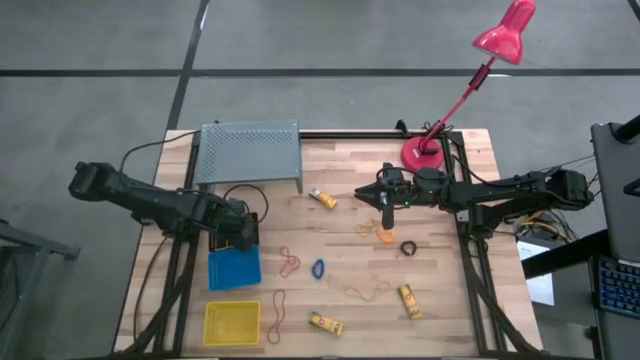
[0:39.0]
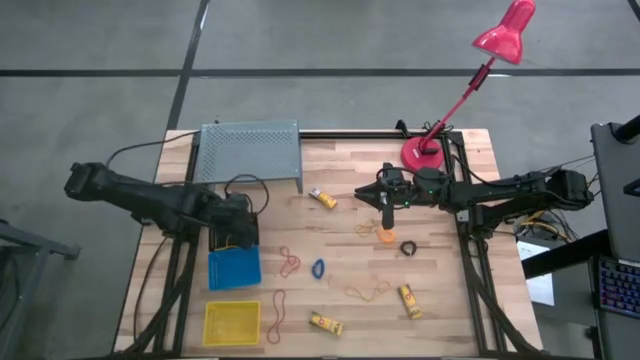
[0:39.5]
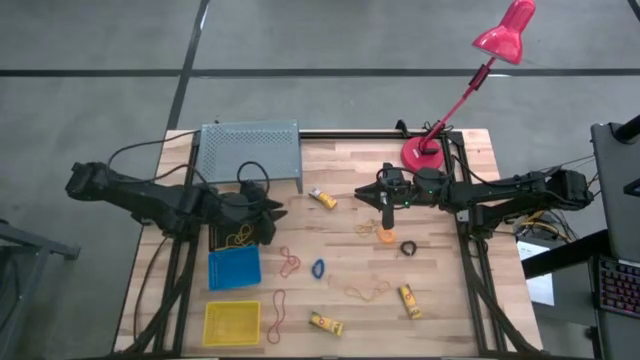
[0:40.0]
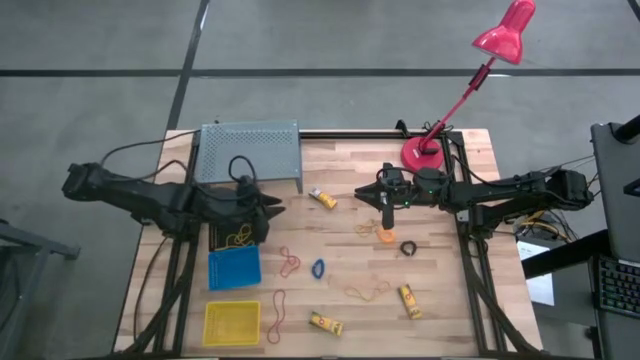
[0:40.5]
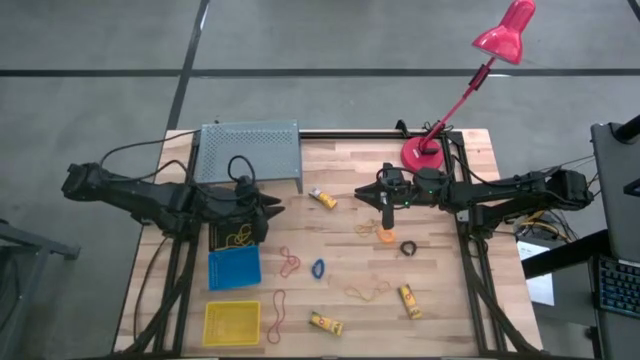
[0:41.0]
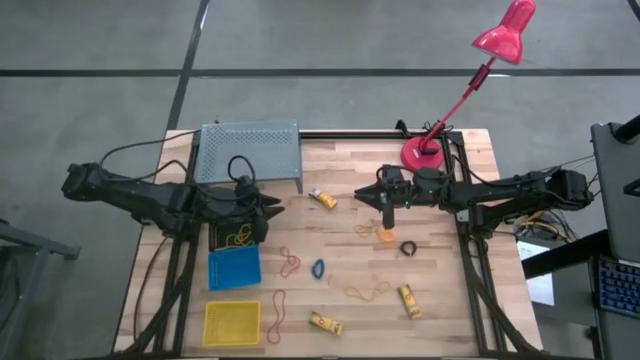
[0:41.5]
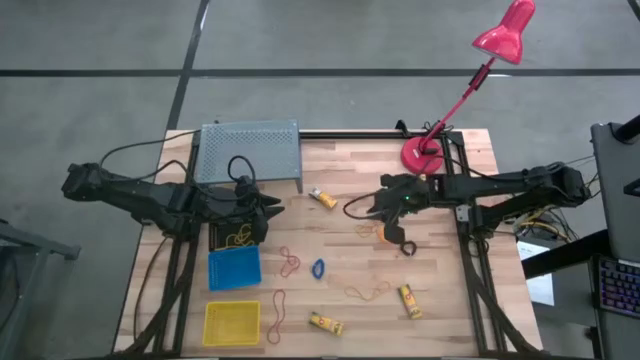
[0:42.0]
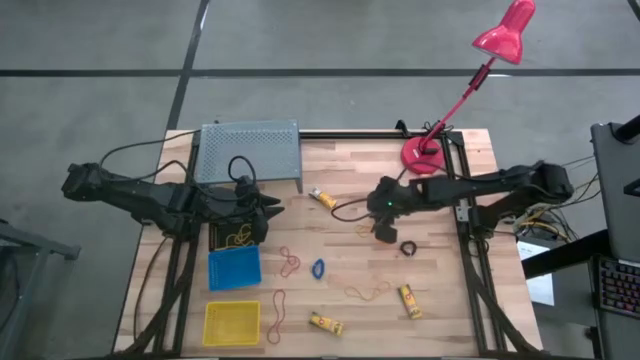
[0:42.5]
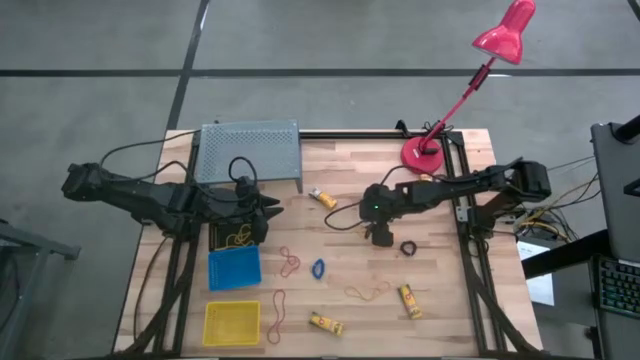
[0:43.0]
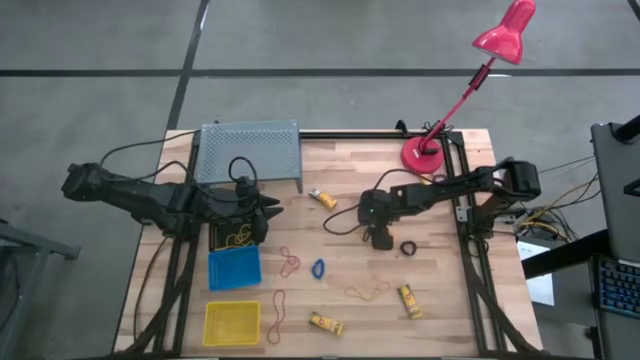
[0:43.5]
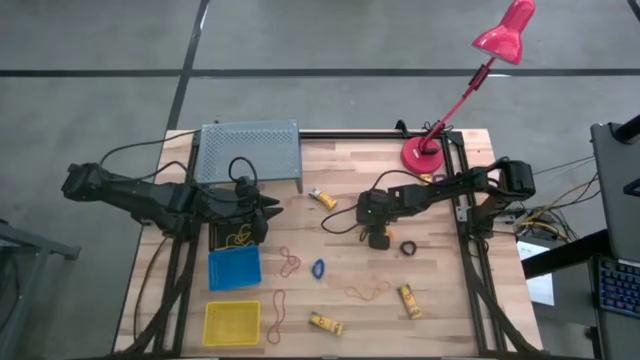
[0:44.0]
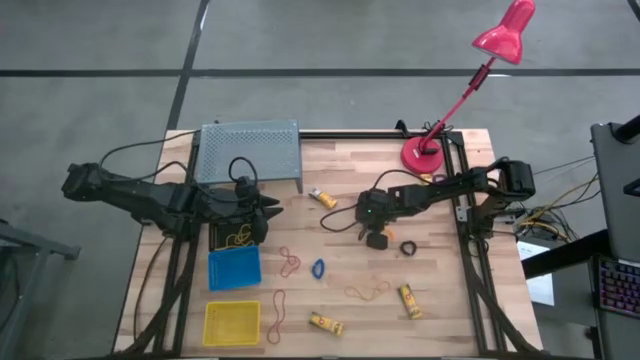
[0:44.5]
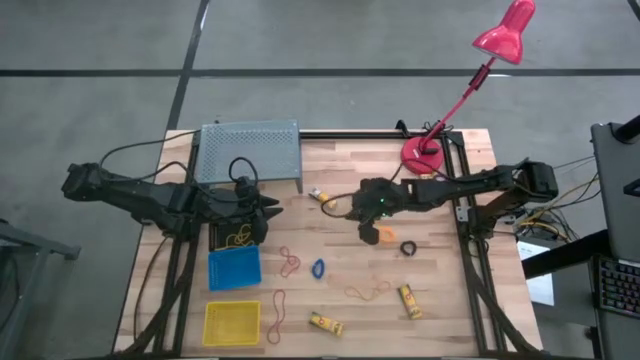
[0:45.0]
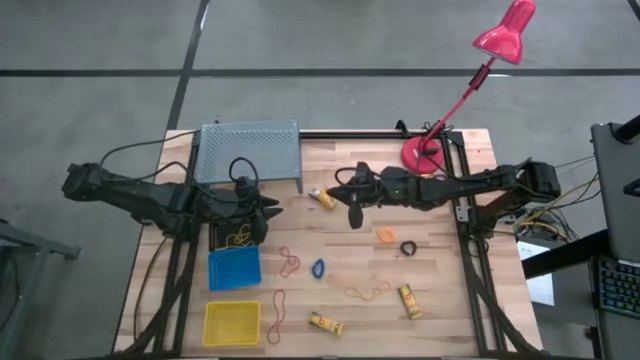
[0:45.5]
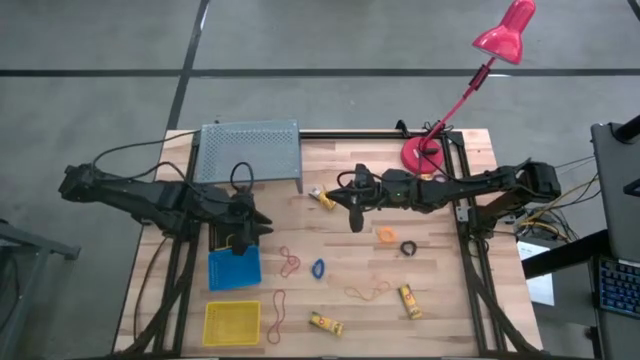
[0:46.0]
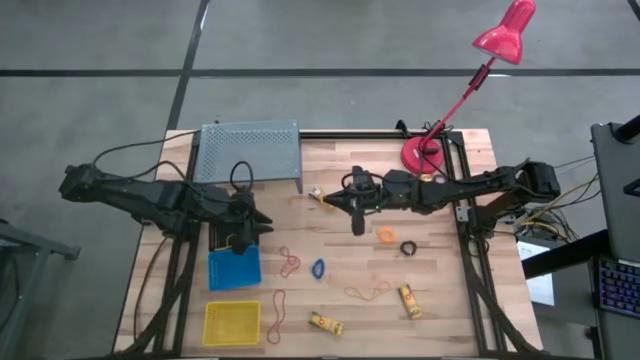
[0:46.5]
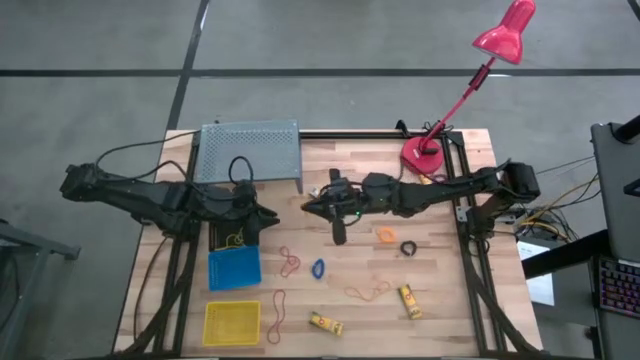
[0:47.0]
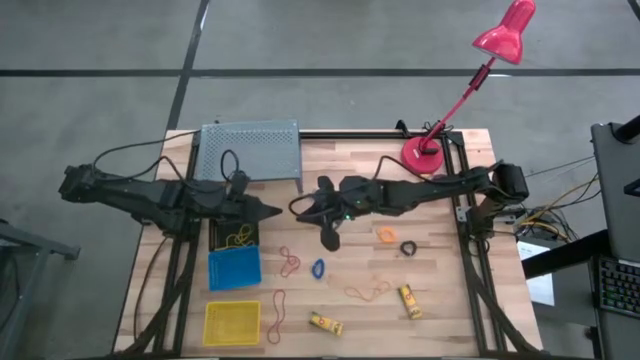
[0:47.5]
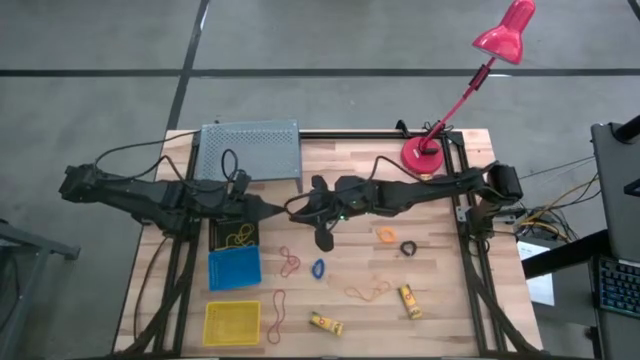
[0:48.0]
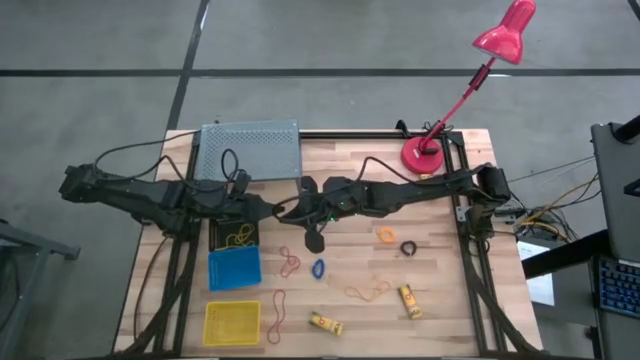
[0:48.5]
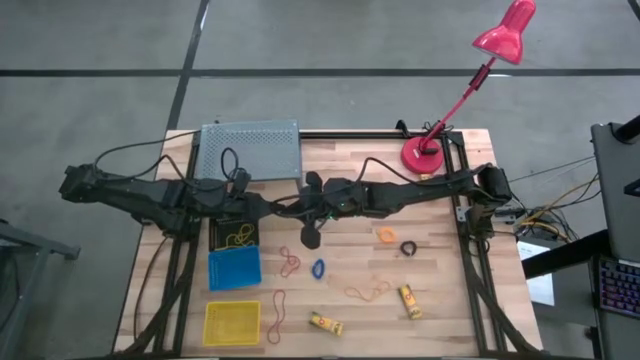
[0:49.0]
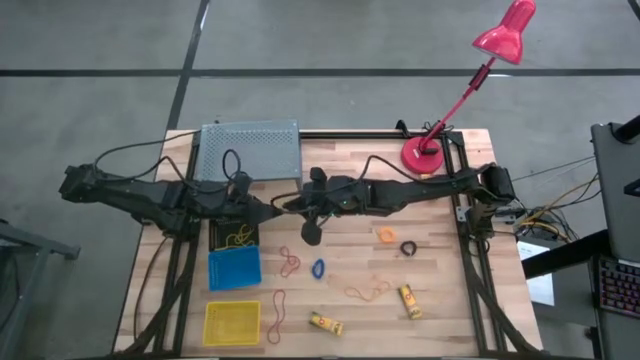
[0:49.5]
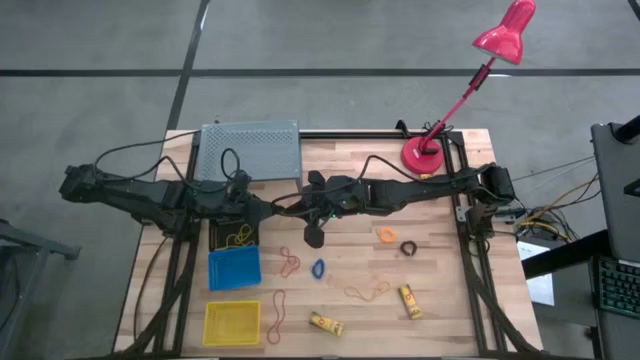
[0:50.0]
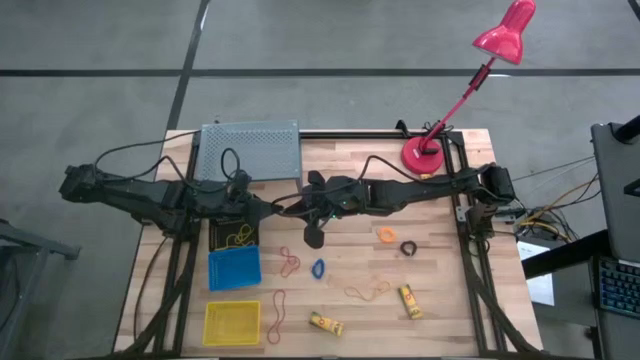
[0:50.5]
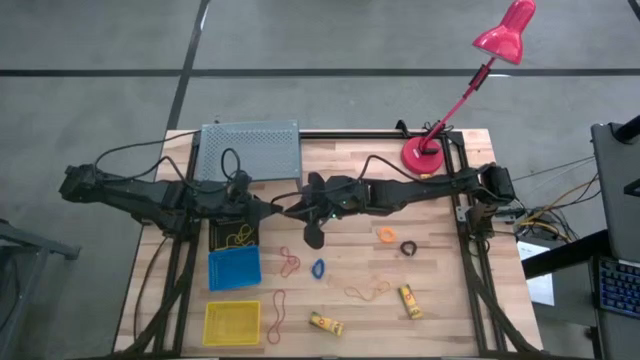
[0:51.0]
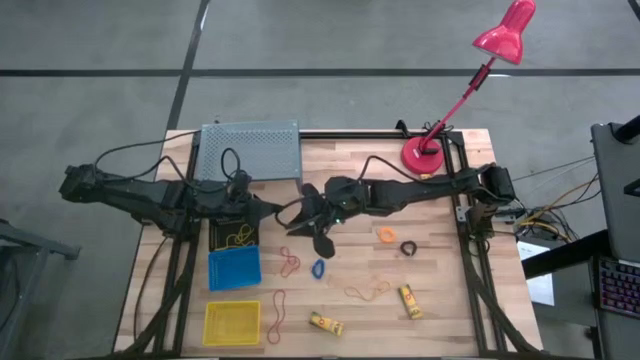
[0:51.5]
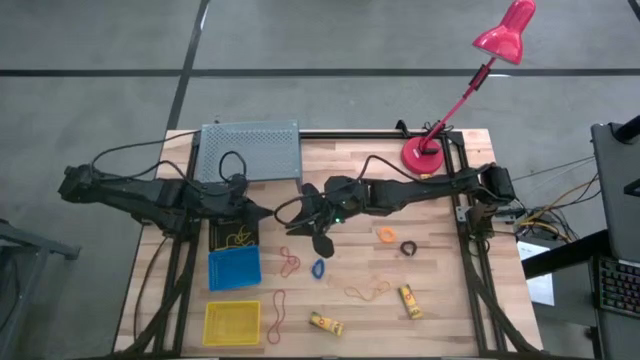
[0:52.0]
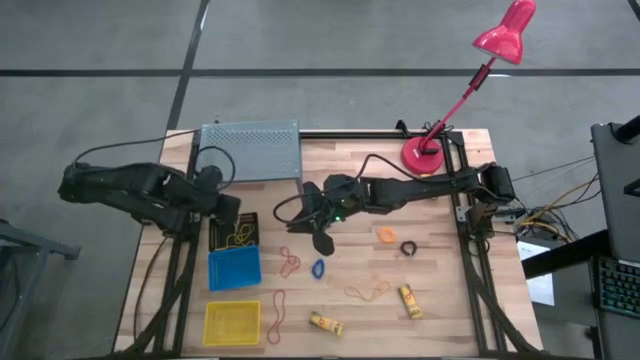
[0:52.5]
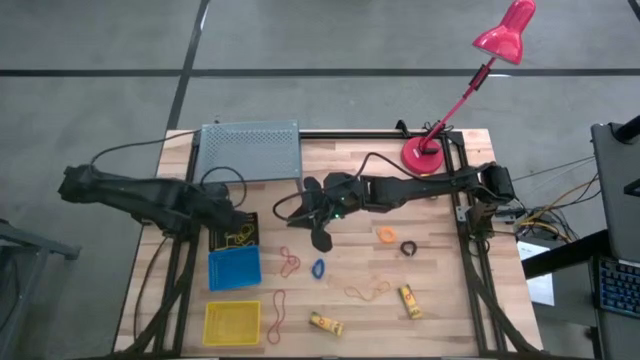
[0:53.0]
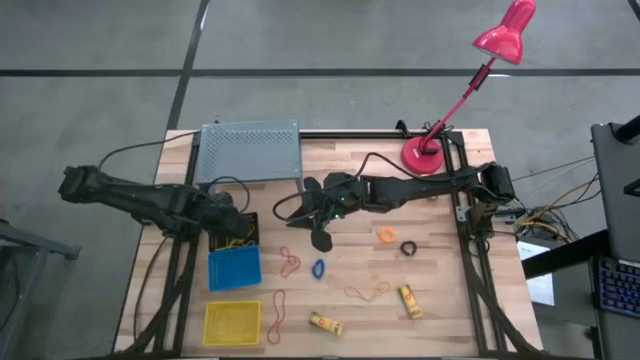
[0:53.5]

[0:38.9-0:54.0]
Task: Pick & Place Office Desk Supplies
Put the yellow rubber band in the black bin

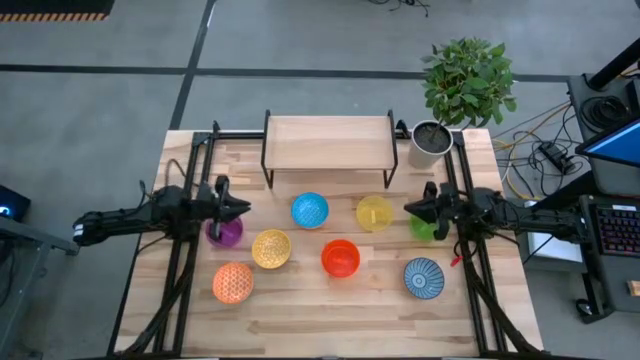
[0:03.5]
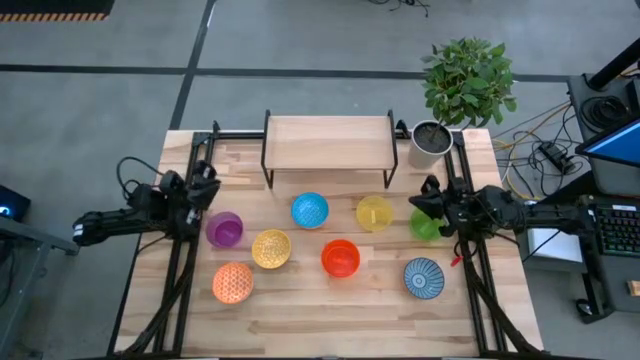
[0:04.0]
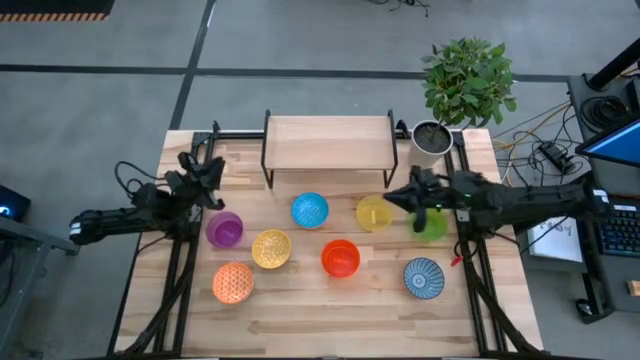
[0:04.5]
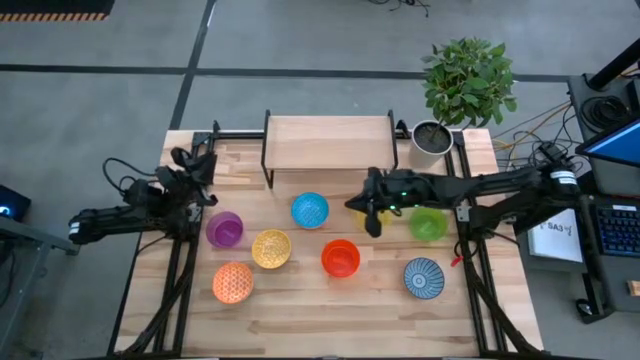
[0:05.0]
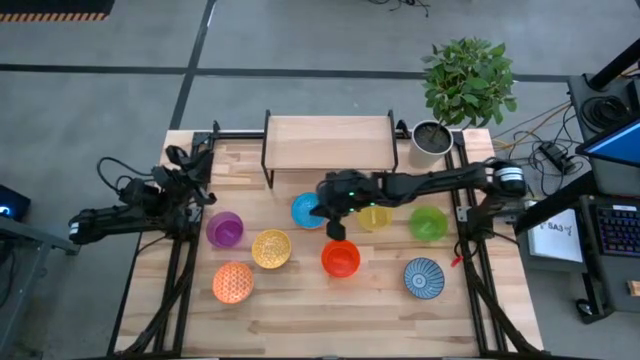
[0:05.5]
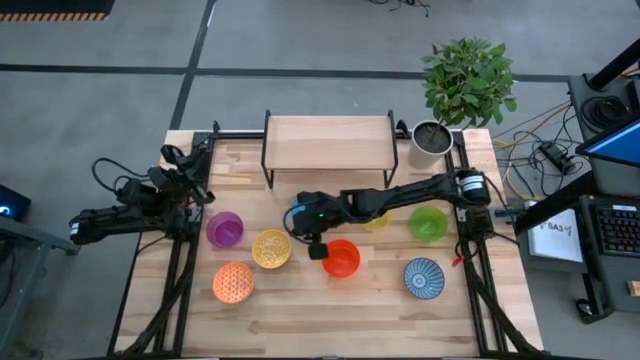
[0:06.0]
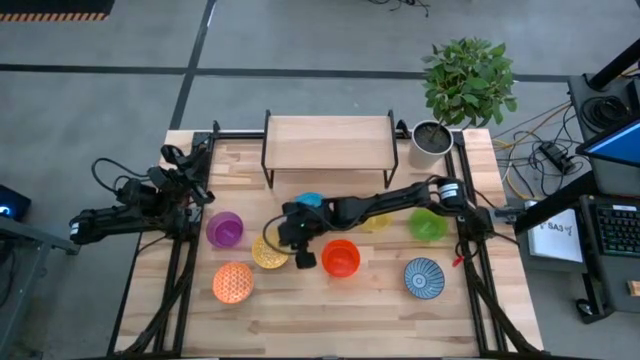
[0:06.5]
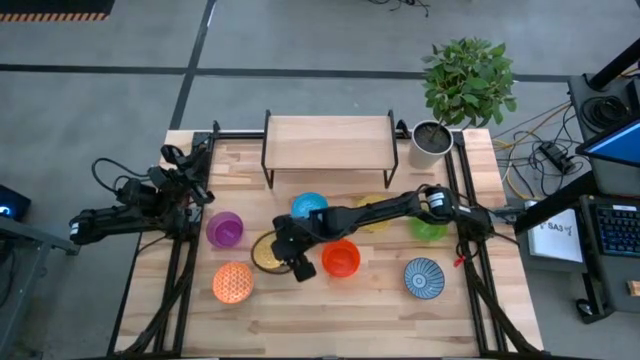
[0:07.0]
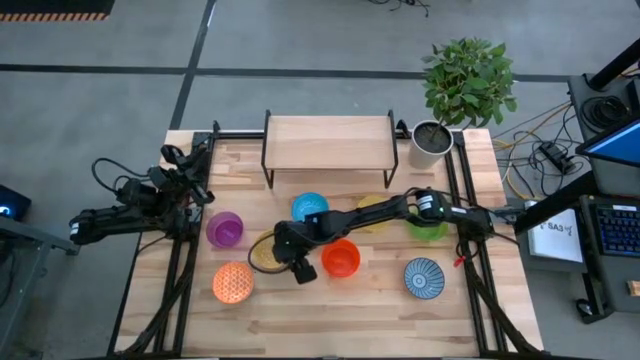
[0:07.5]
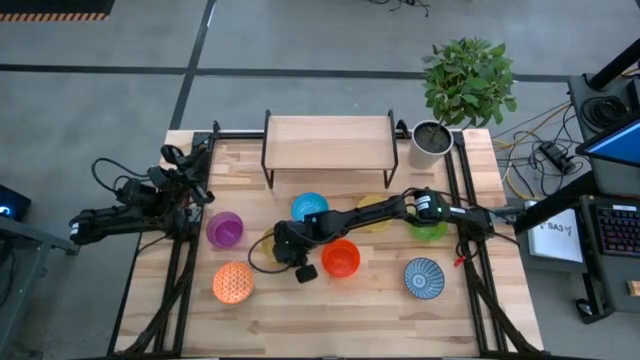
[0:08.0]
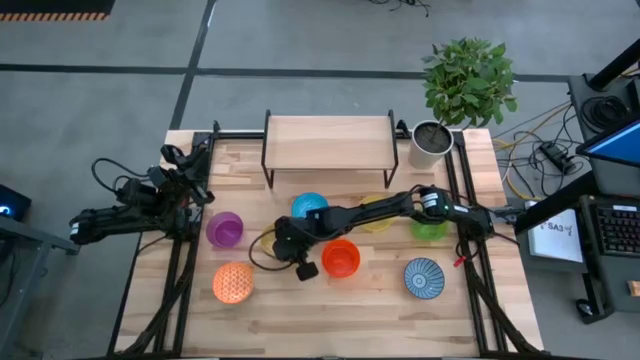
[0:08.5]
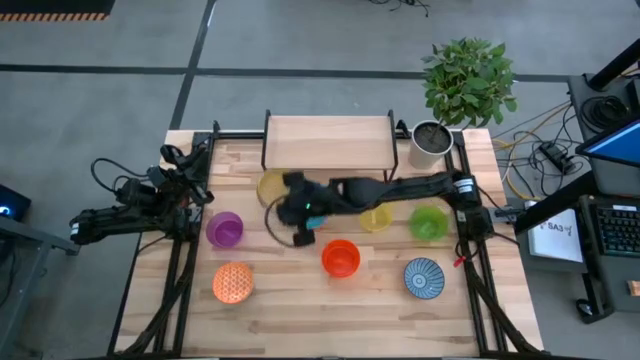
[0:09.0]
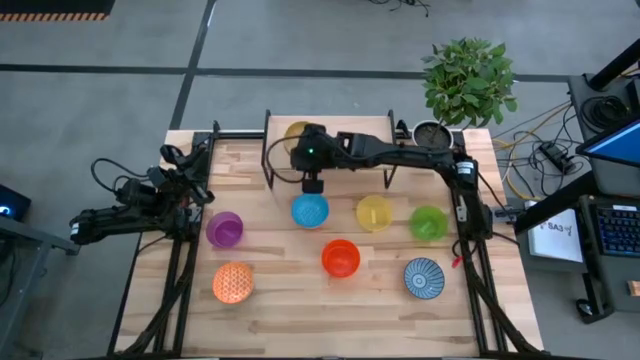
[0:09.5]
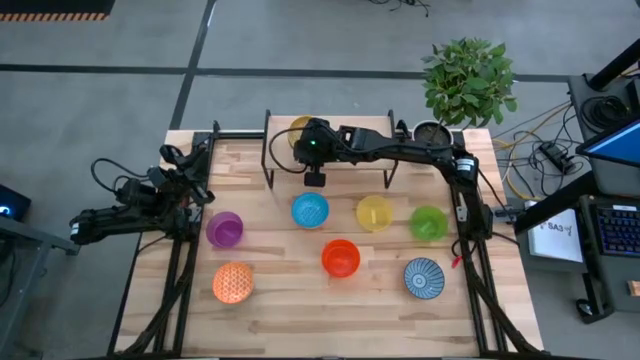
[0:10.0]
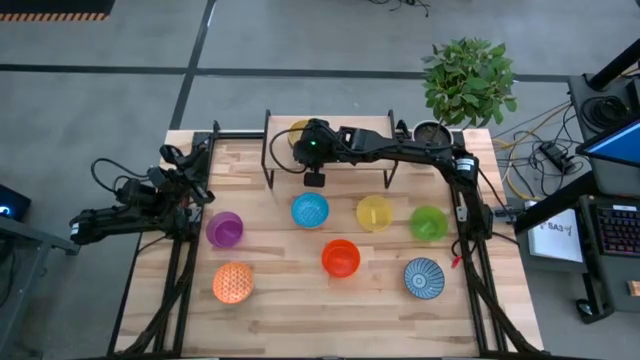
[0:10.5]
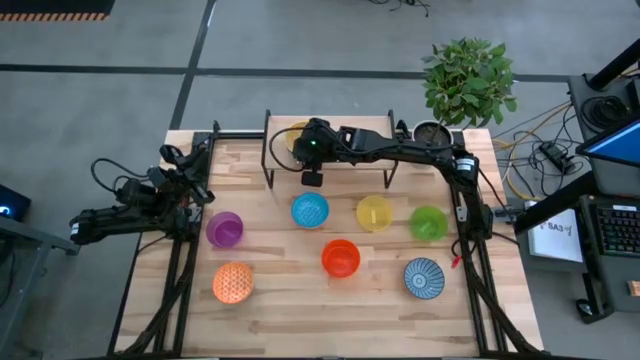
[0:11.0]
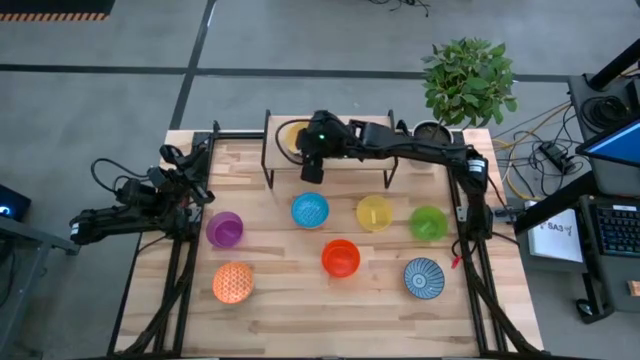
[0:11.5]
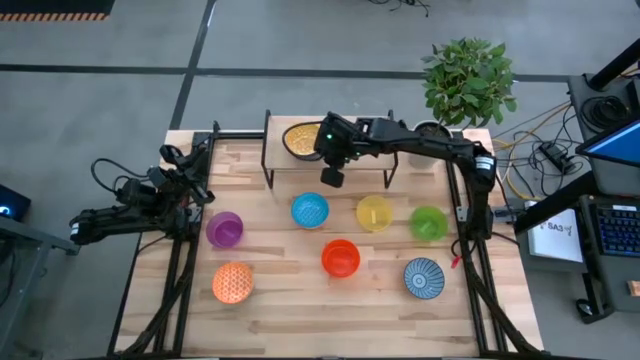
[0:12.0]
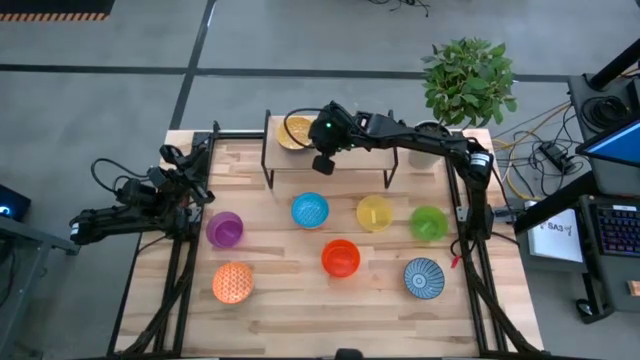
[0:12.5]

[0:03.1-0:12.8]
Task: Place and stack bowls onto a shelf
Put the yellow bowl on the shelf
